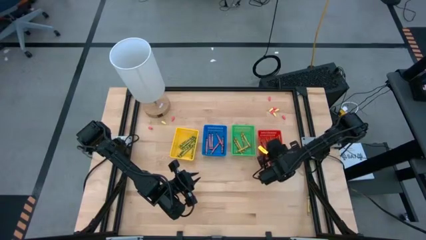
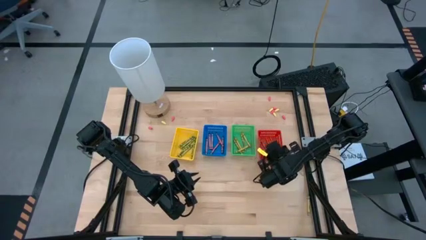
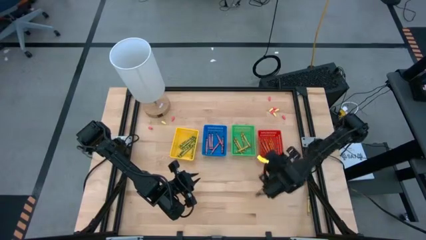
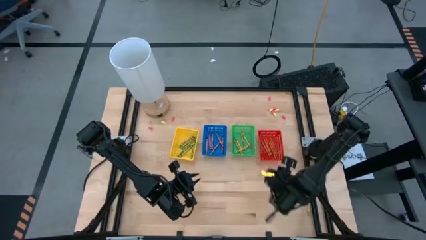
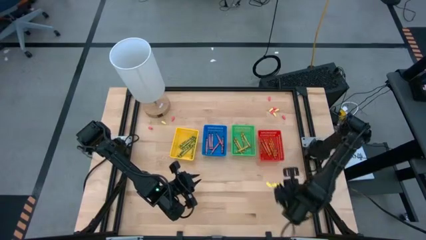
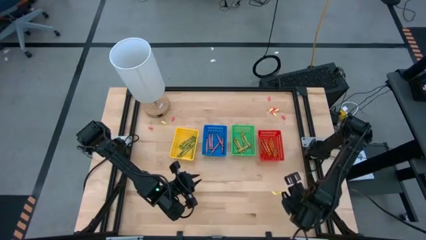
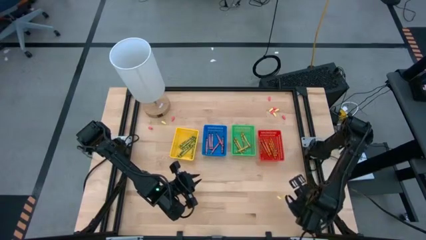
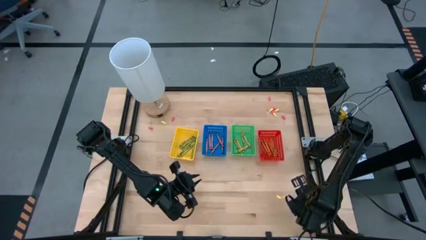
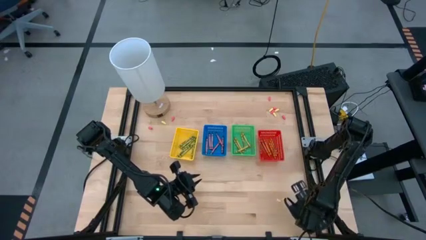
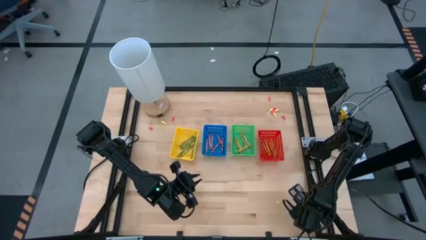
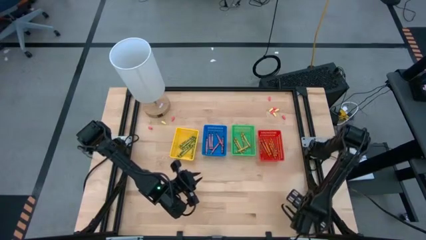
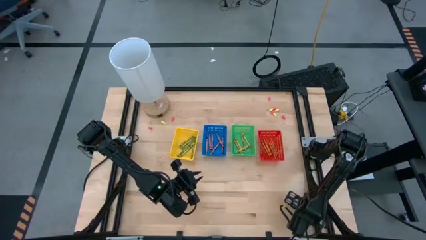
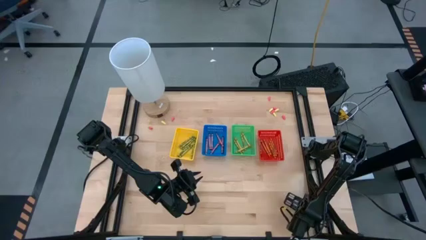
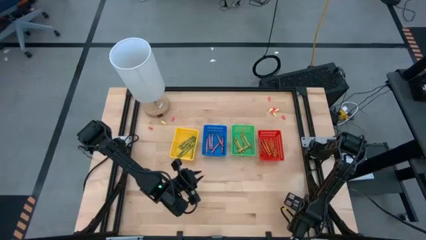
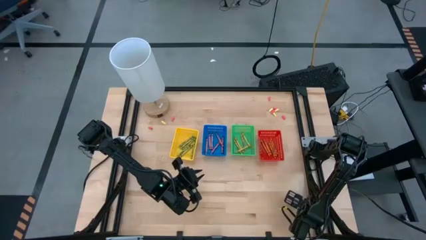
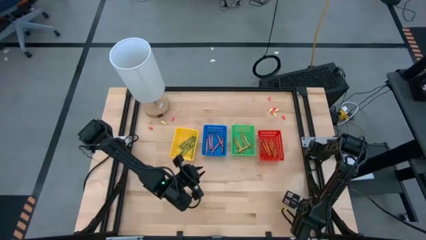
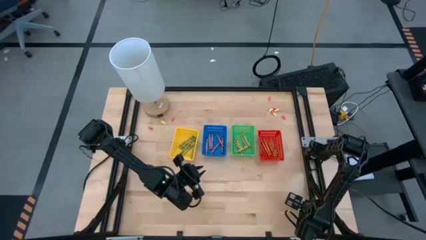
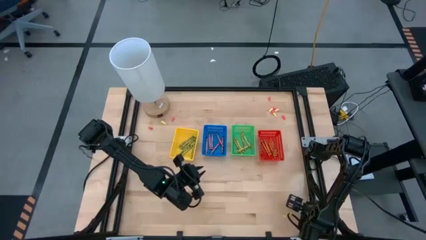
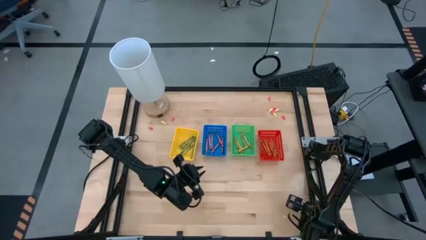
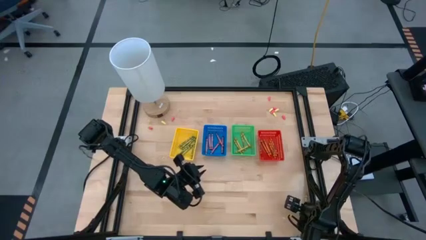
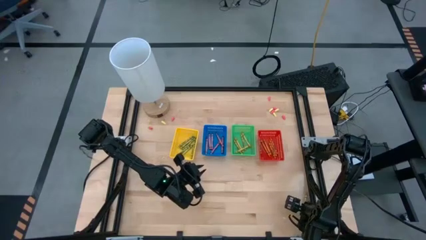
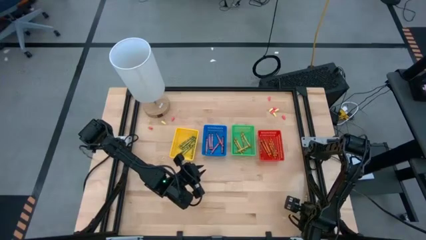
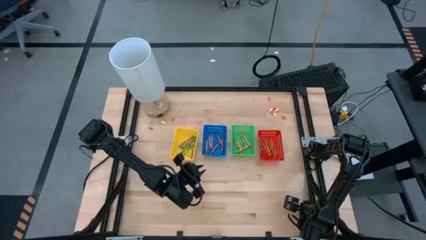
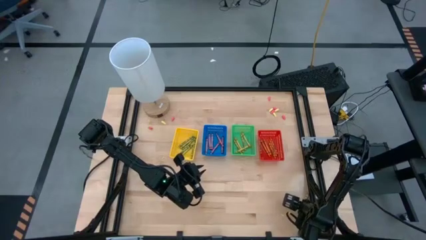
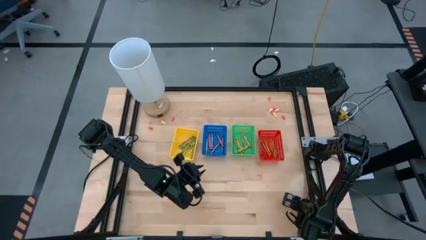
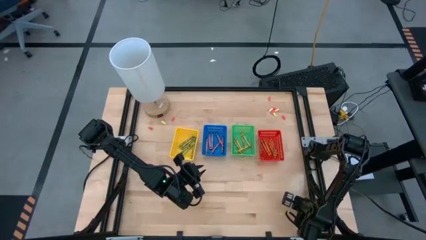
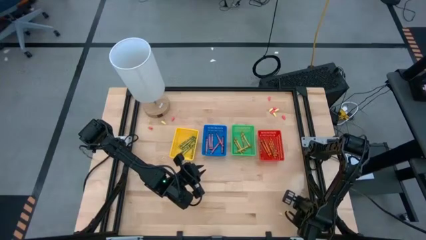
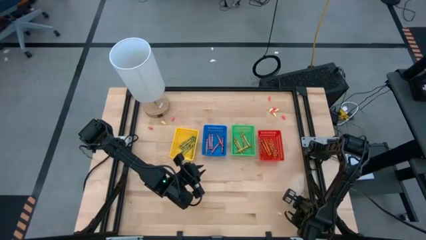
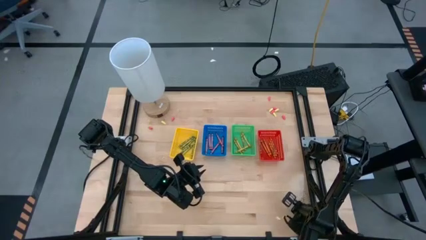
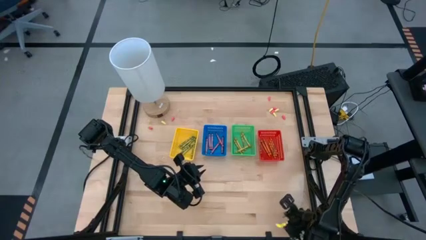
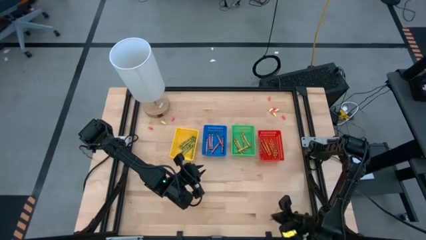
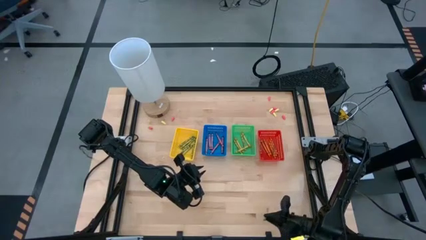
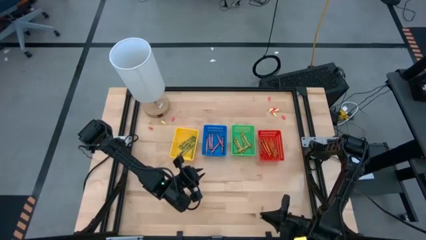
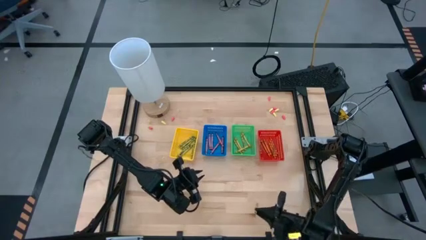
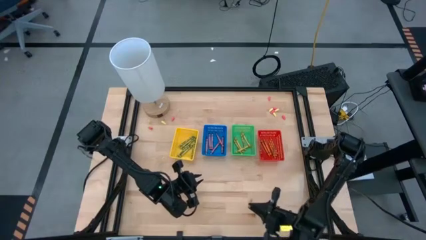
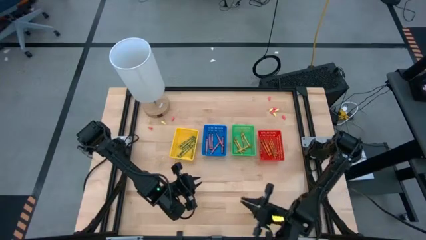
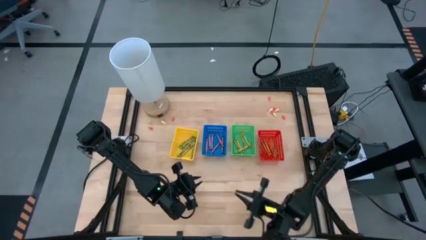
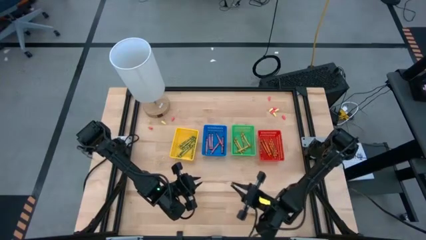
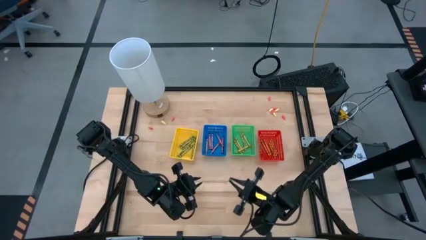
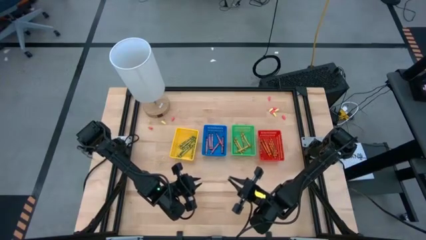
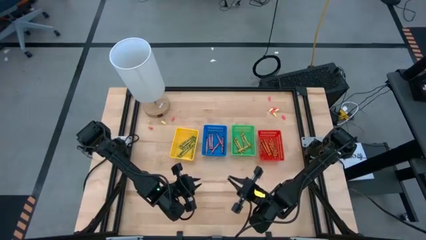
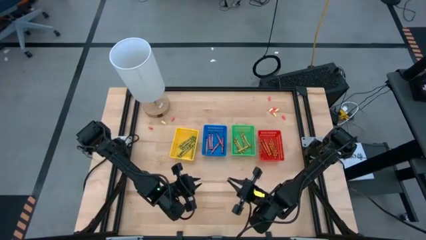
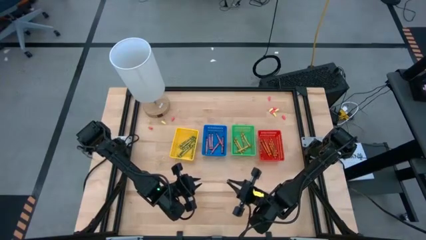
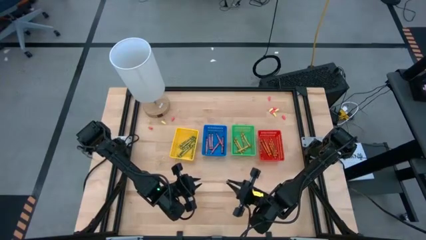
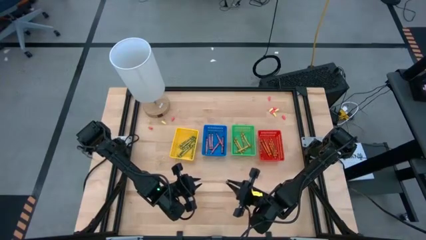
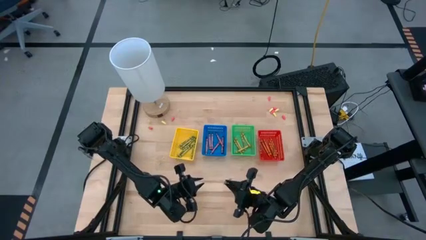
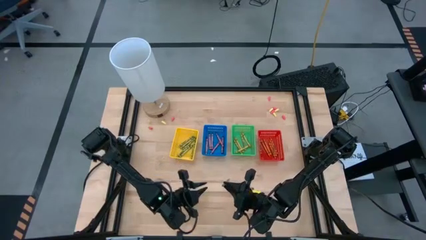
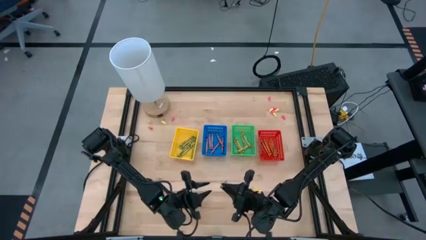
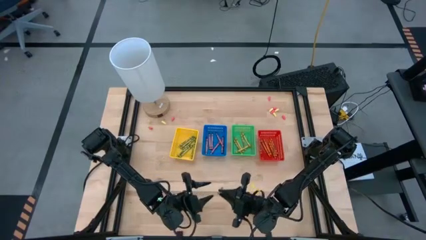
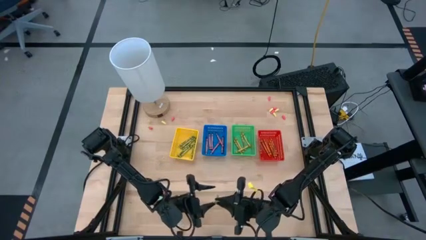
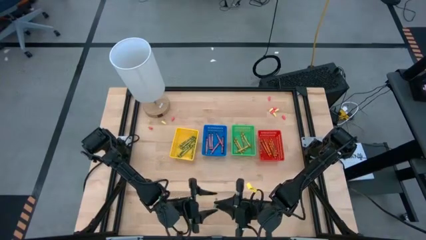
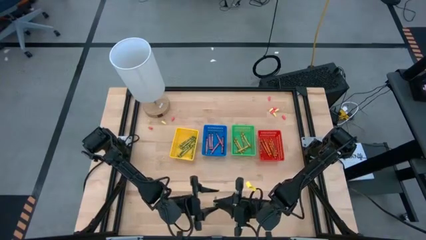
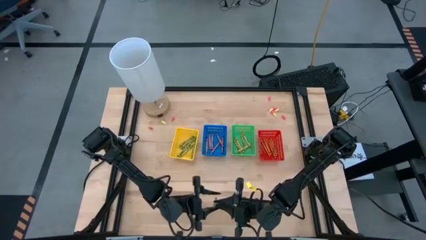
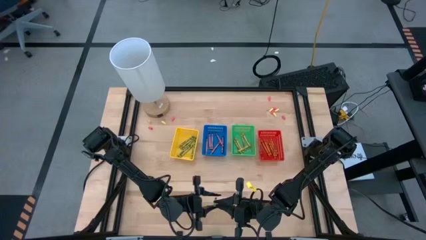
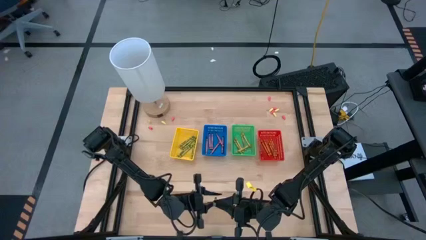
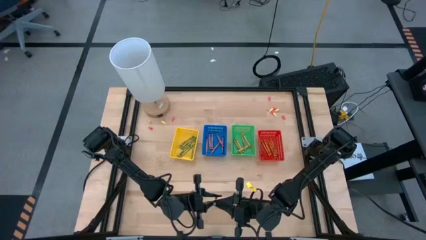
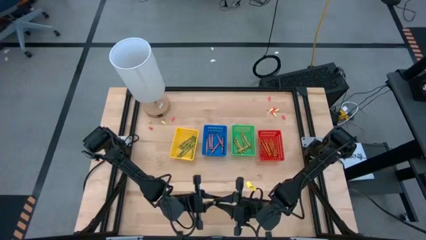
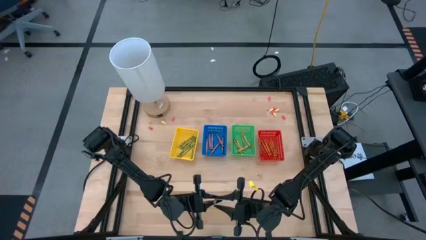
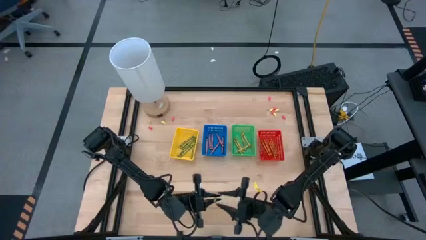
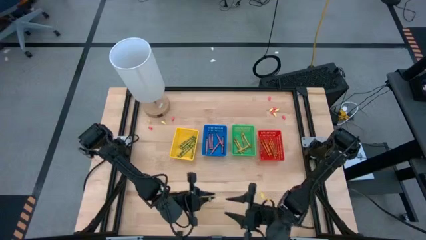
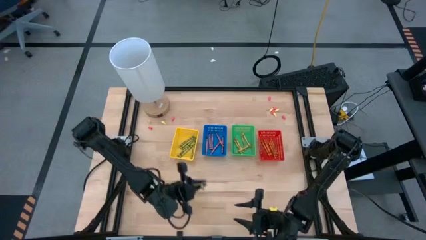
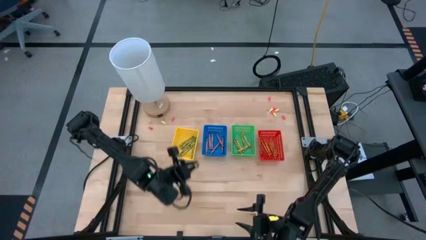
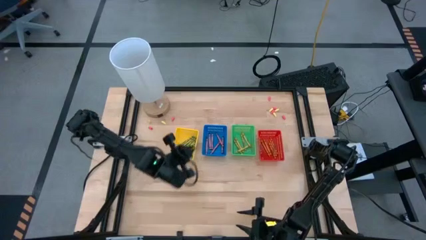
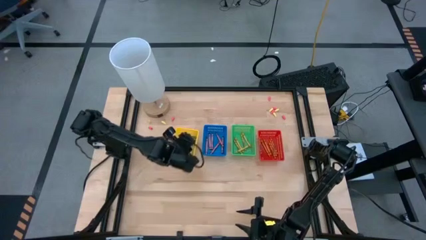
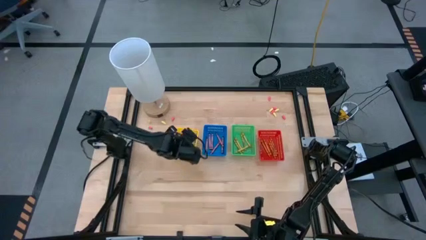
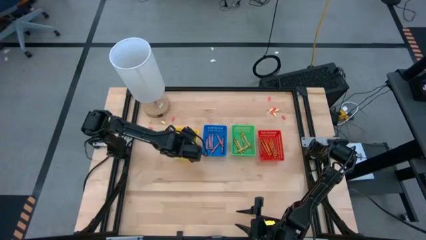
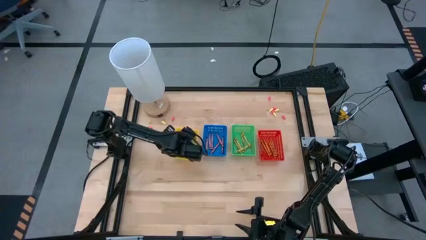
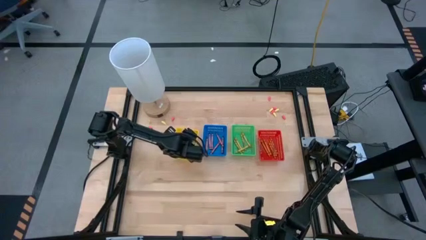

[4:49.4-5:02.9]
Task: Sort crayons
Put the green crayon into the yellow bin

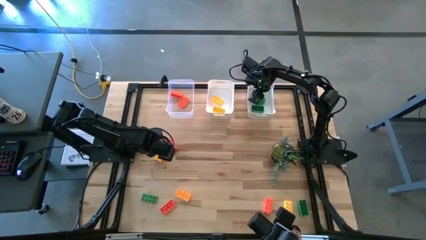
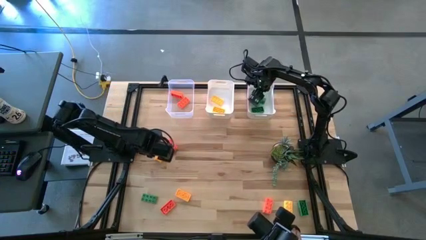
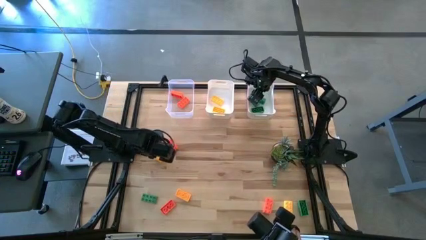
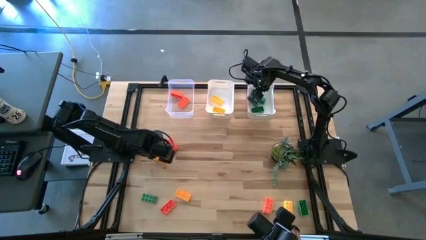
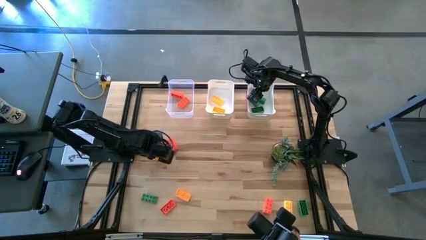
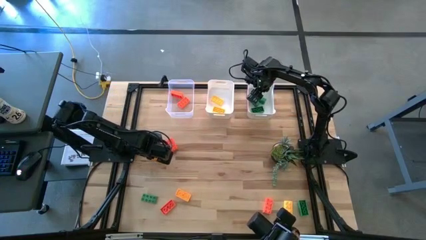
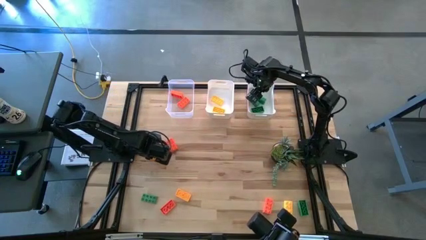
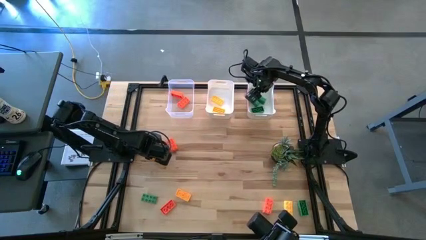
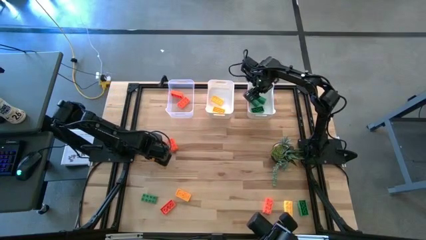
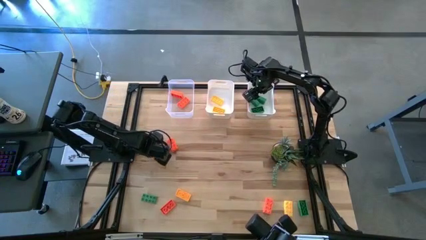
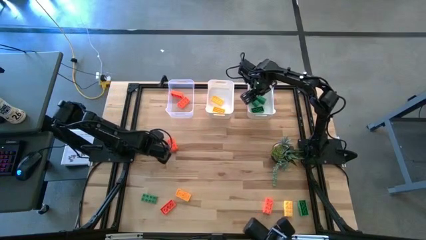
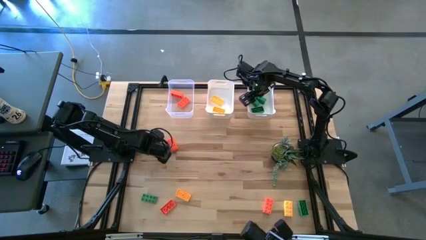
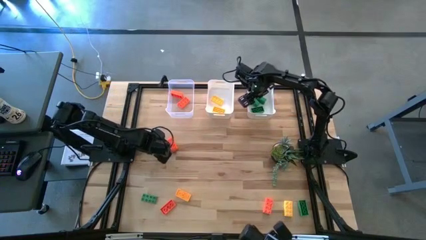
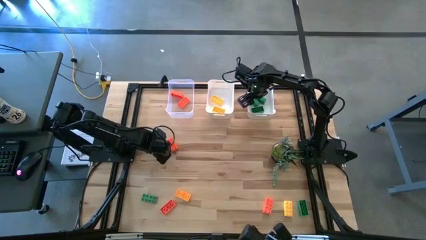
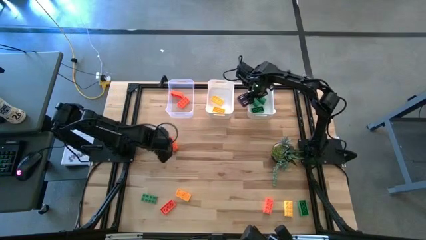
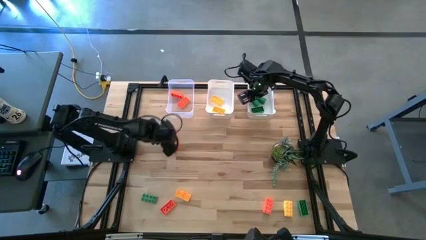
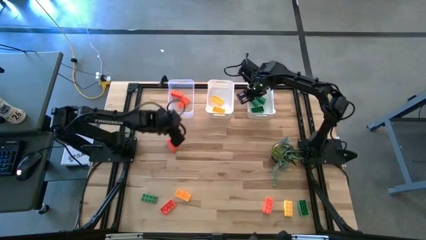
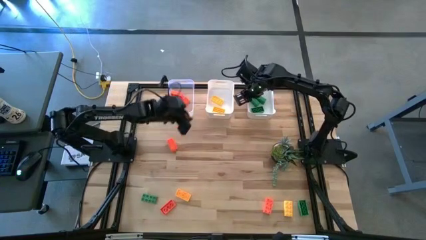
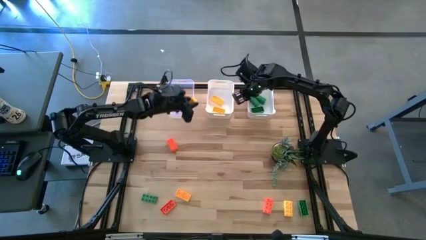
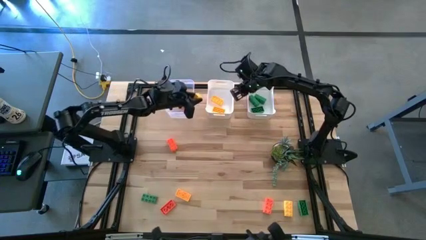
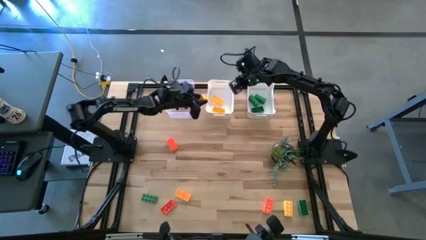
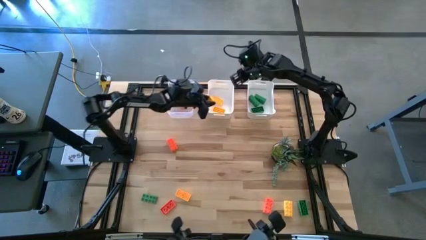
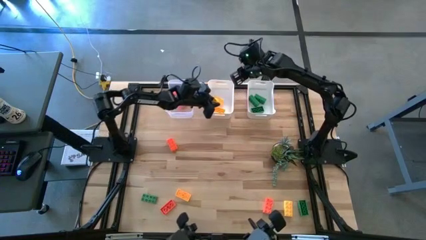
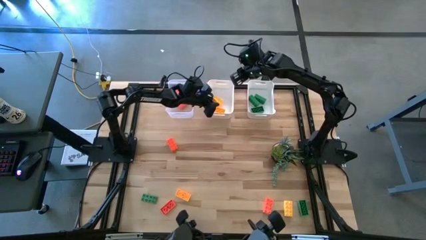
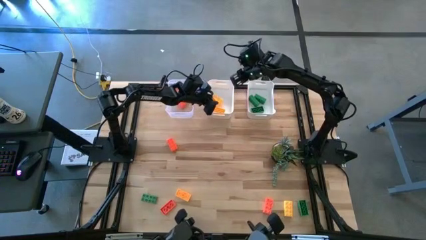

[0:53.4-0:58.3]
Task: Sort & place blocks by color
Put the yellow game piece into the left white bin
